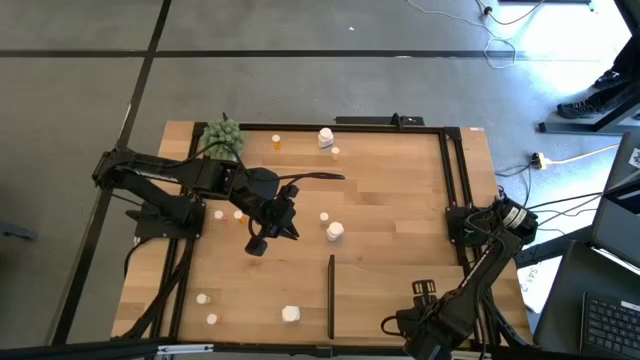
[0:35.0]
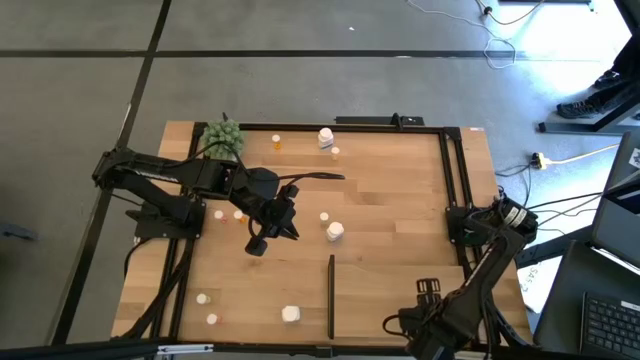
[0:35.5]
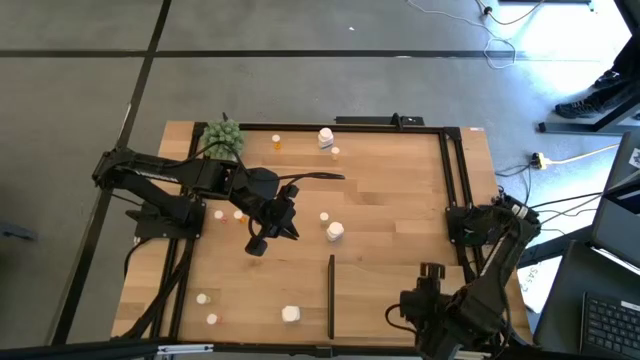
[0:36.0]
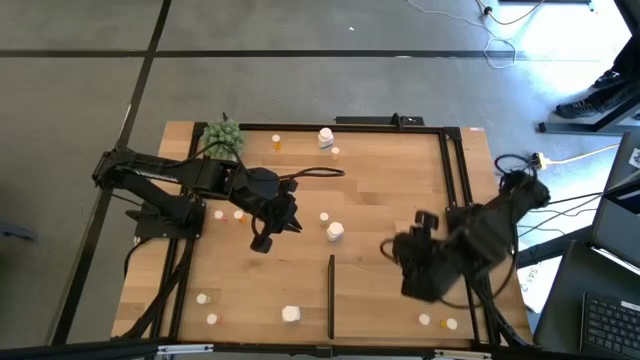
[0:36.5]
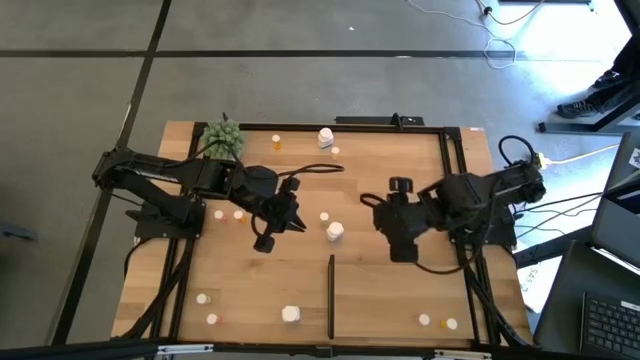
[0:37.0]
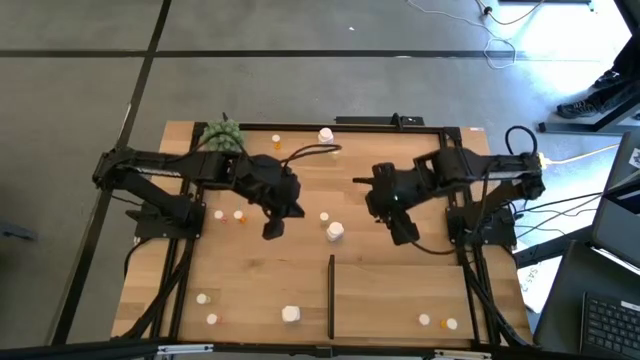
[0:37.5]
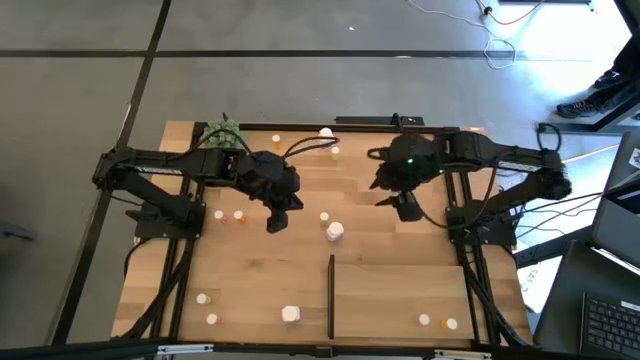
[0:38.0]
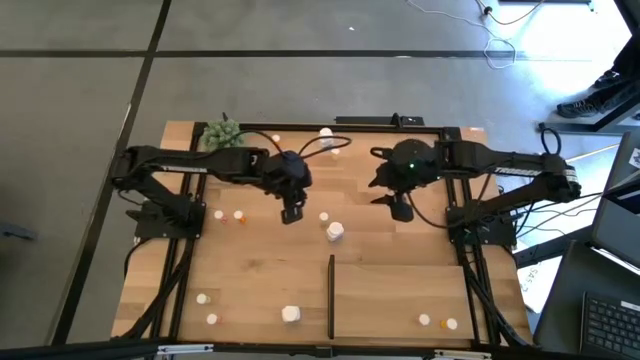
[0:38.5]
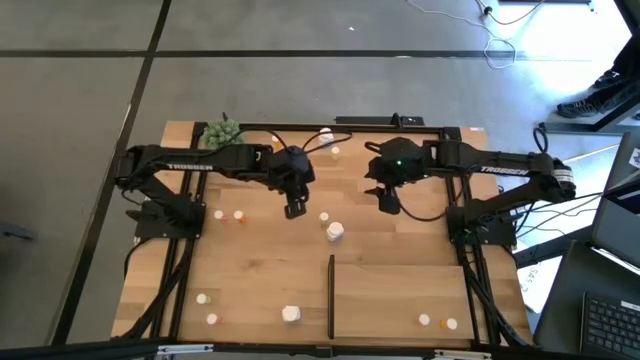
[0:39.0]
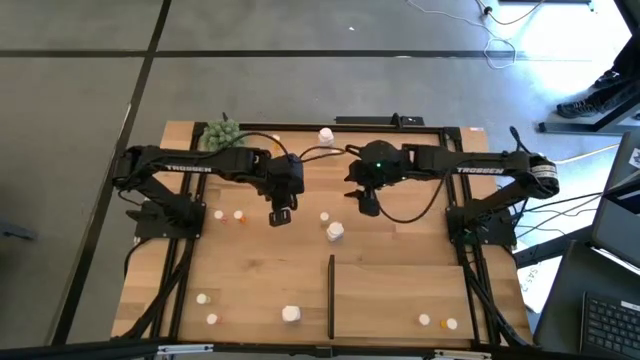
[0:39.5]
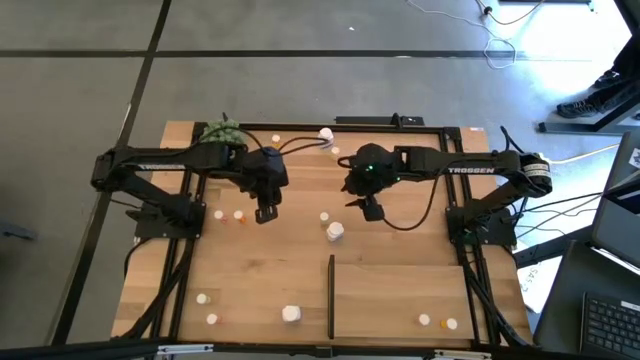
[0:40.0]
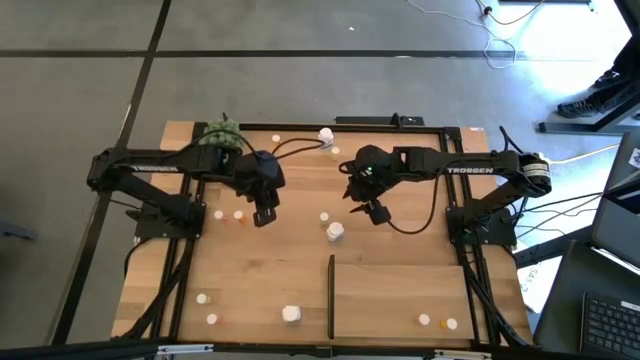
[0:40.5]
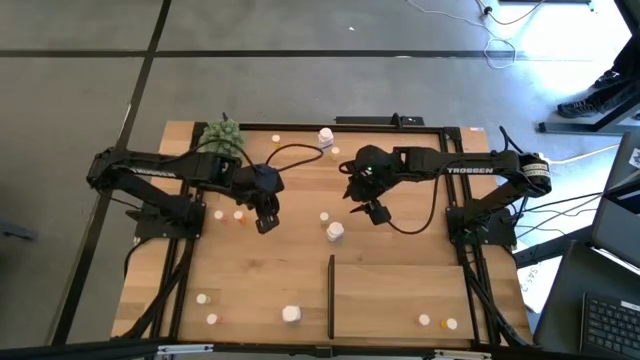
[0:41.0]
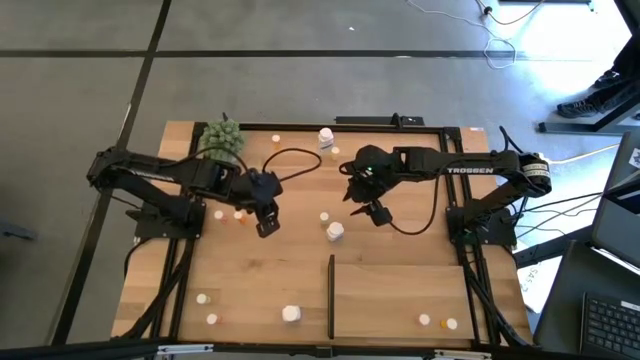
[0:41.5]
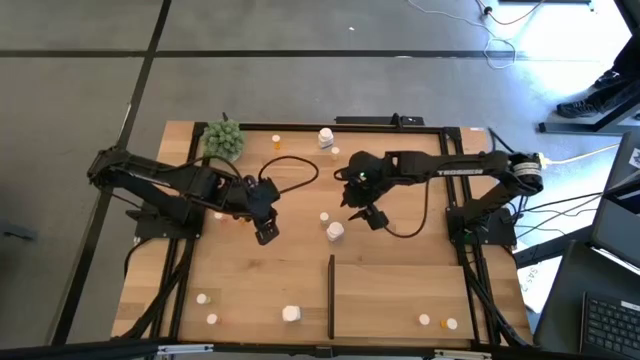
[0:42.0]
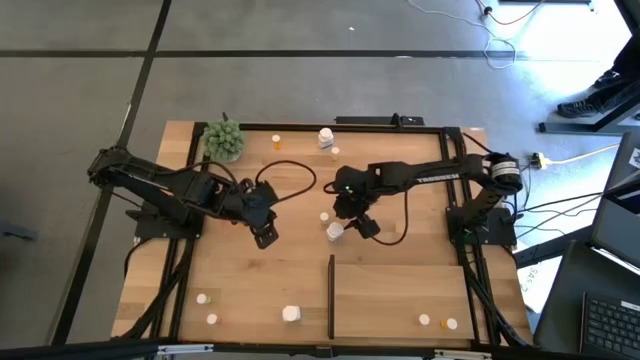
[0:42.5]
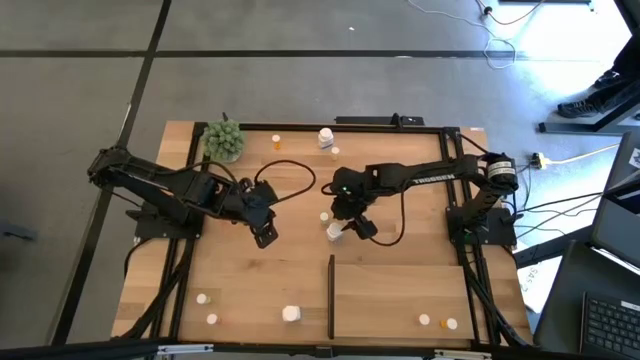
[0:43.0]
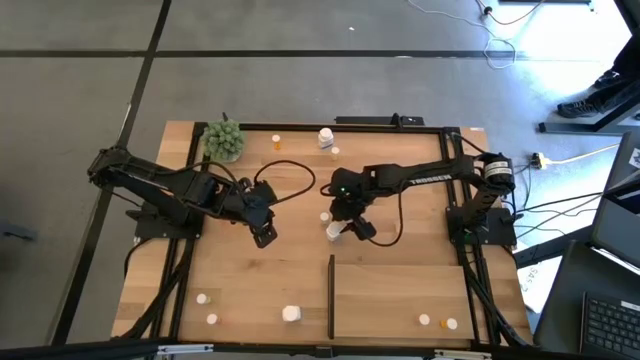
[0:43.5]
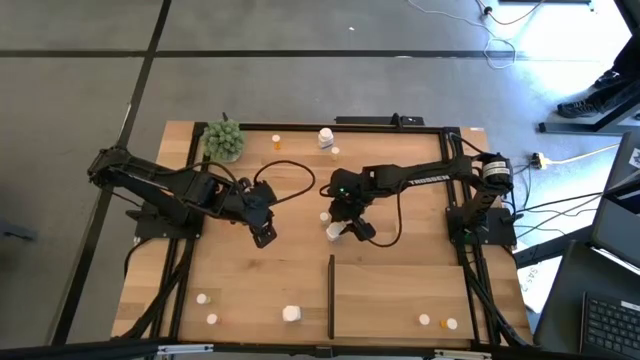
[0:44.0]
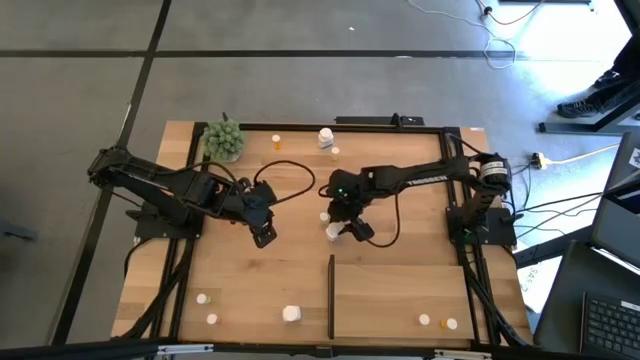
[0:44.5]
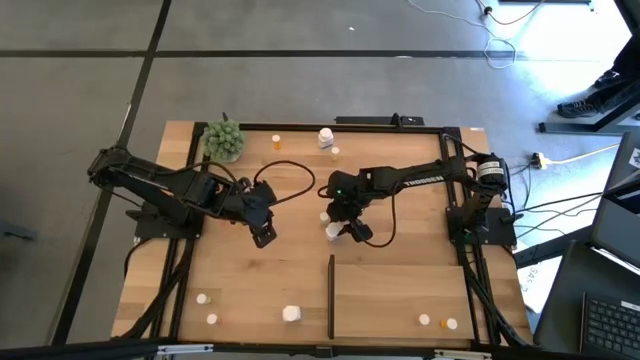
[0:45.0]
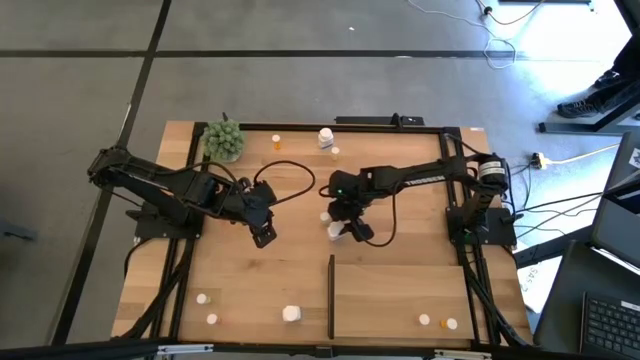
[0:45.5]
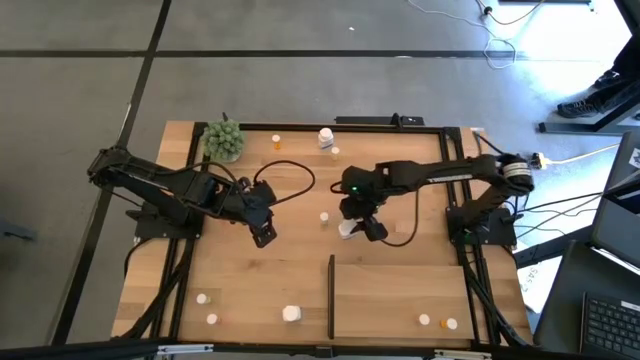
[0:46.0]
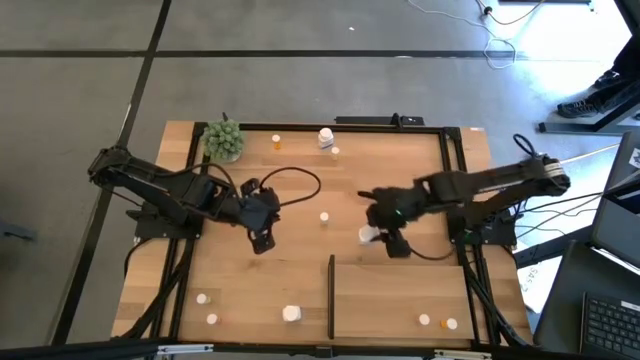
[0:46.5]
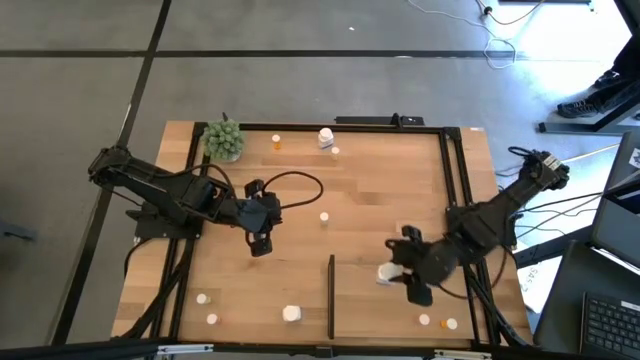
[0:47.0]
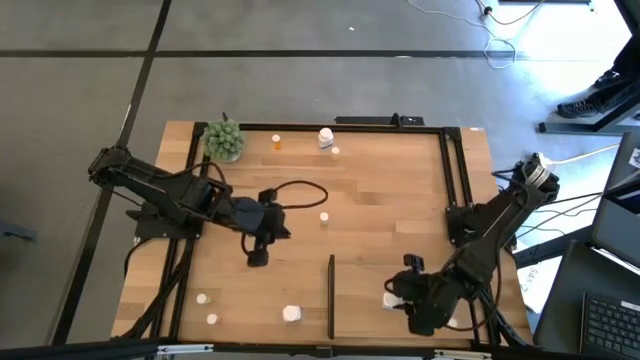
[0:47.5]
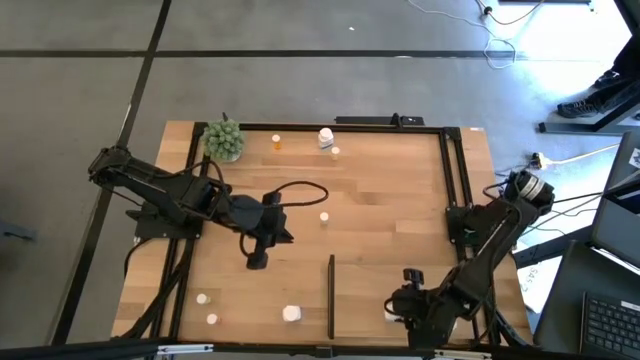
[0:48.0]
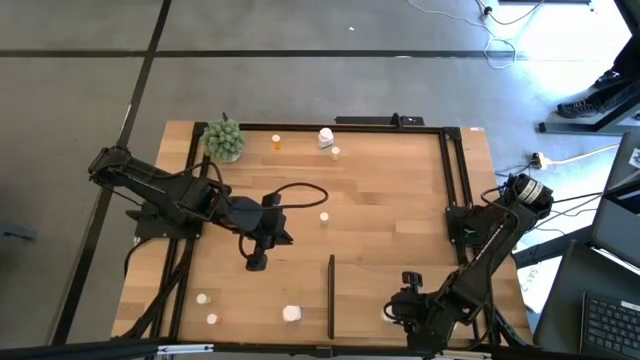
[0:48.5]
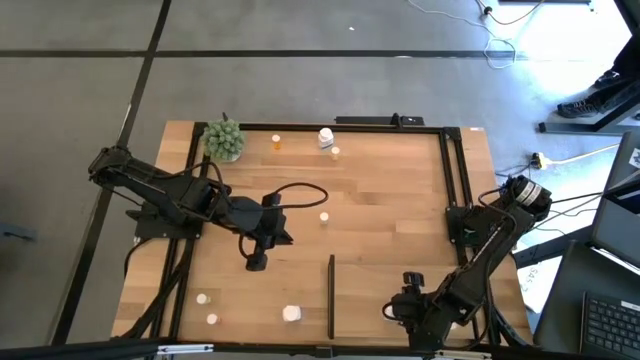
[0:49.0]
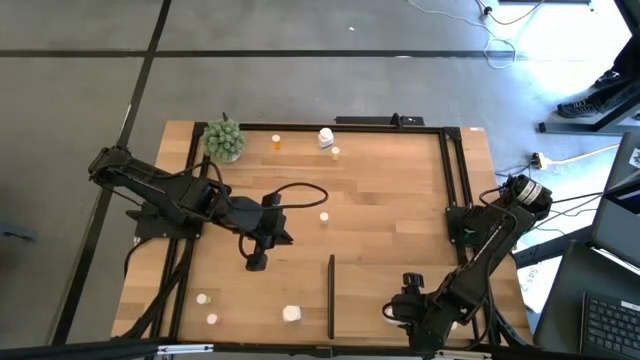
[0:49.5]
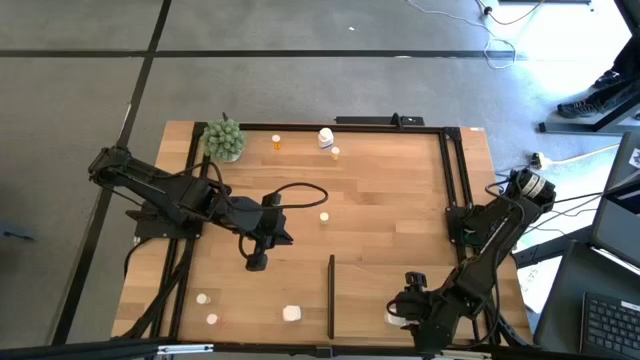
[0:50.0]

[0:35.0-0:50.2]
Task: Pick and place medicine bottles onto shelf by color
Put the middle supplement bottle on the shelf

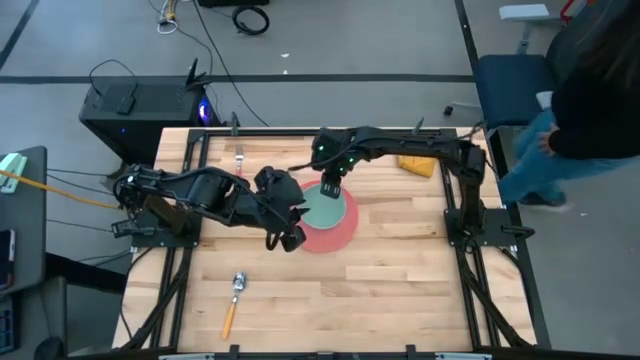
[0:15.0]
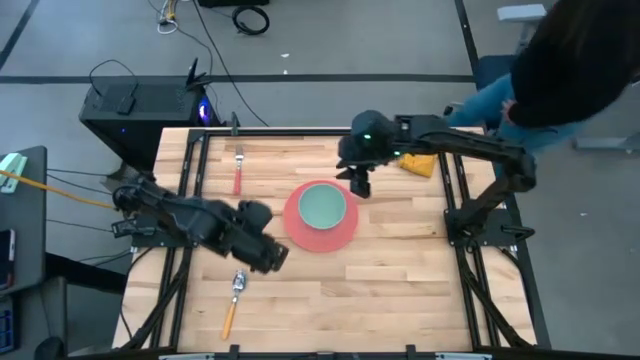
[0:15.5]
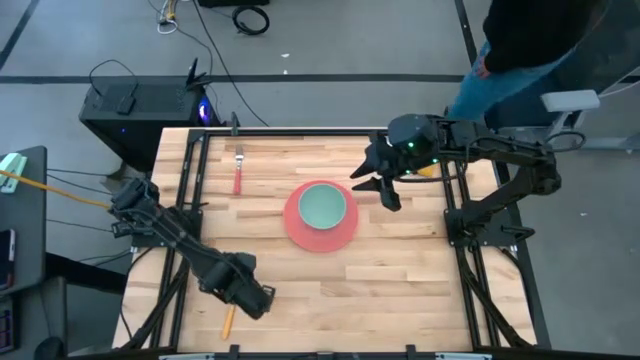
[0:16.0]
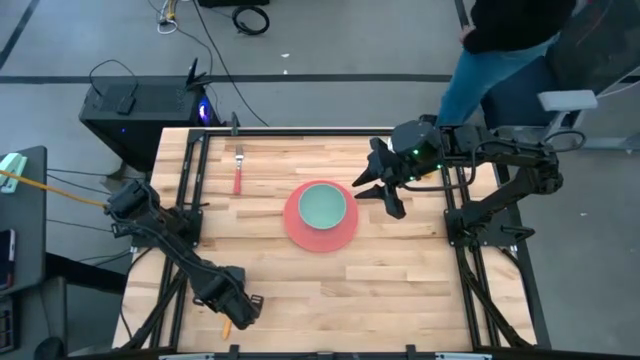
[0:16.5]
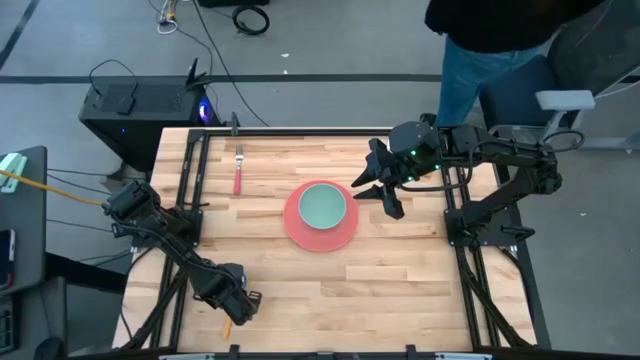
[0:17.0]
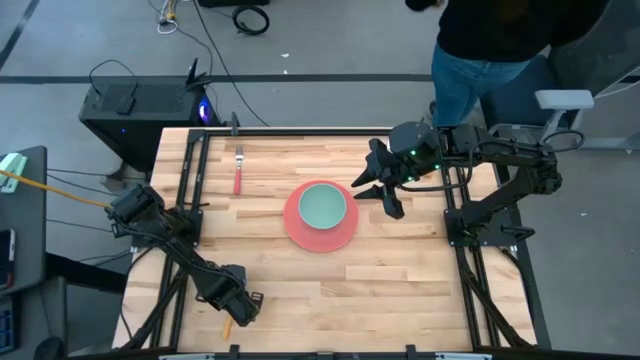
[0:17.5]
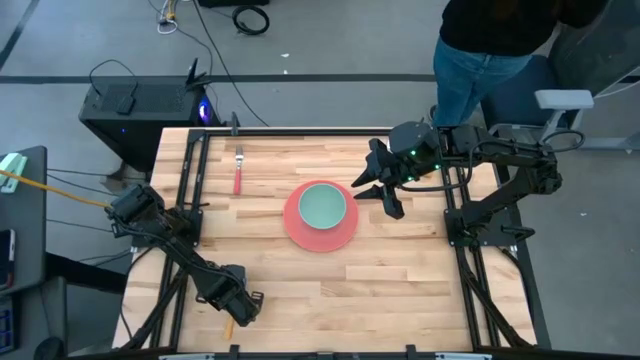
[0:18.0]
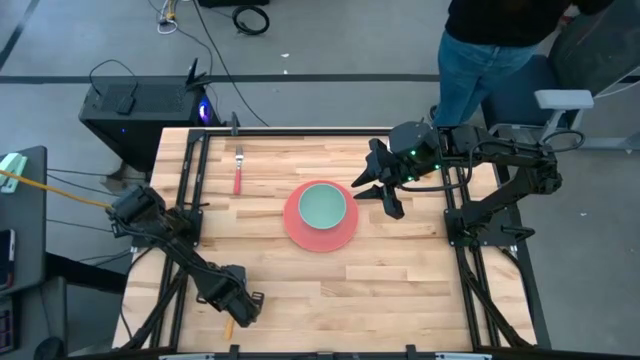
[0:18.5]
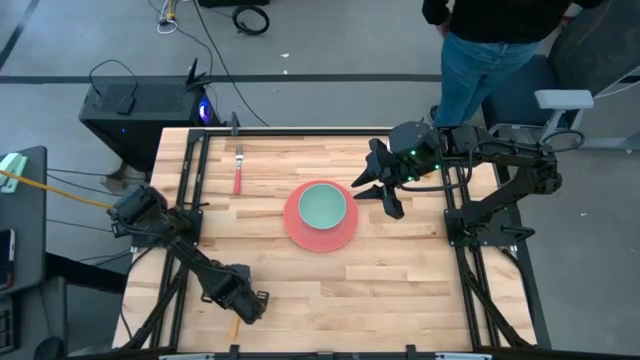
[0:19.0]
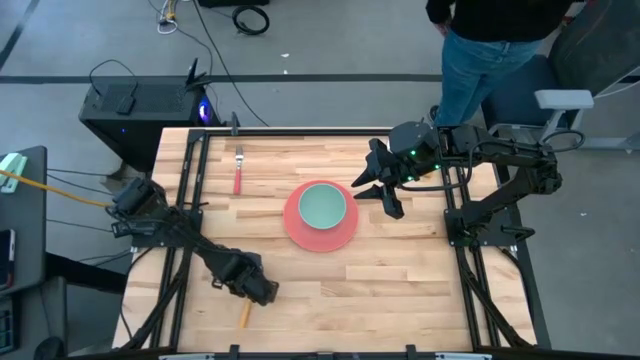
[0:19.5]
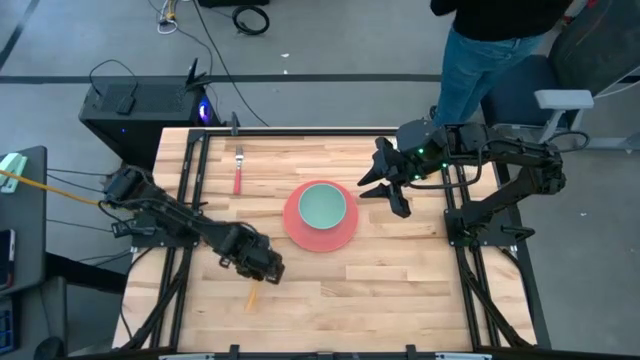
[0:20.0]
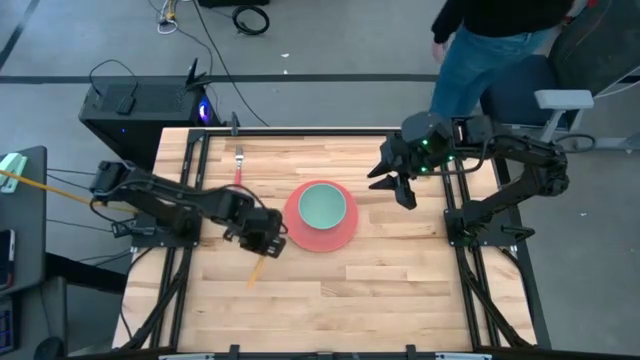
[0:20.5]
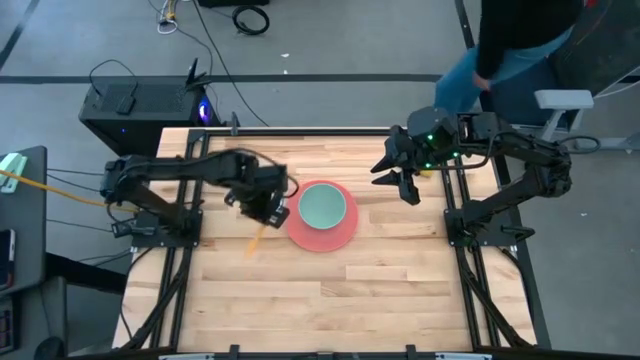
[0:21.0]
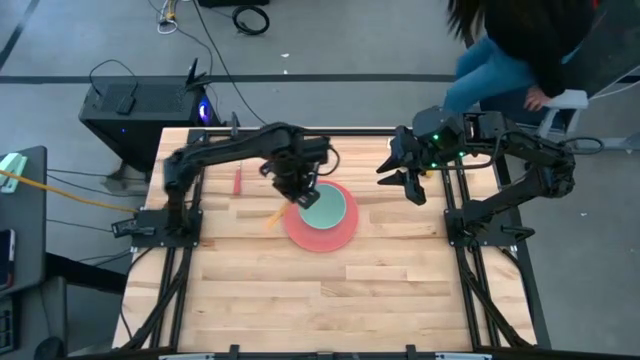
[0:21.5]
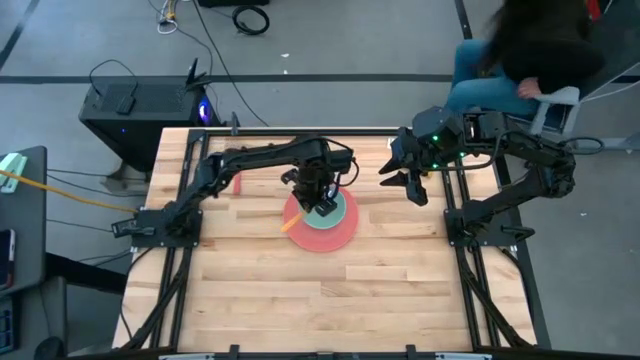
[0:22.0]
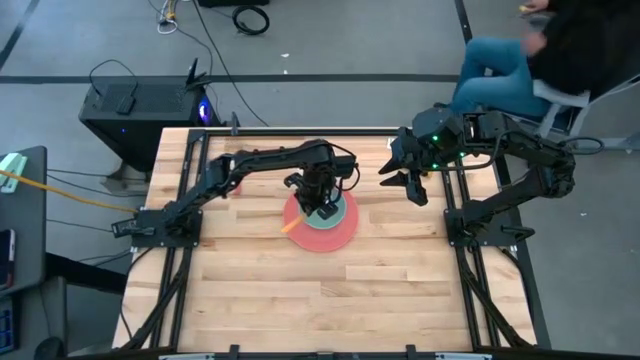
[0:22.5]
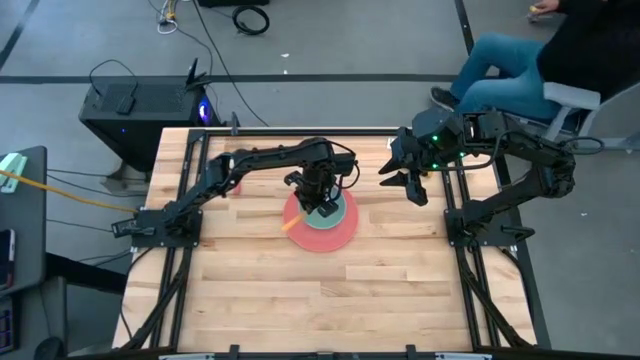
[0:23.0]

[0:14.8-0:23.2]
Task: Set table place
Put the orange spoon into the green bowl
